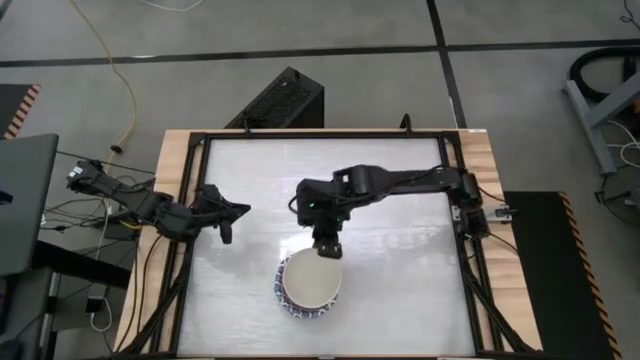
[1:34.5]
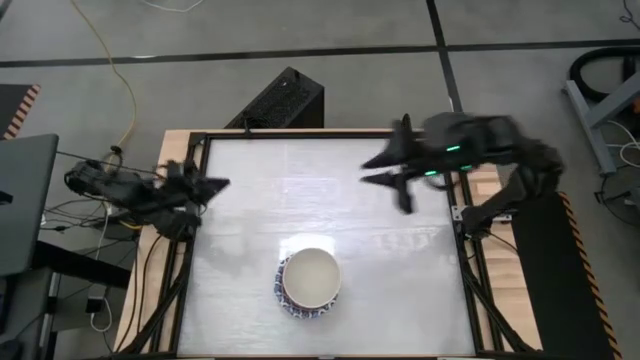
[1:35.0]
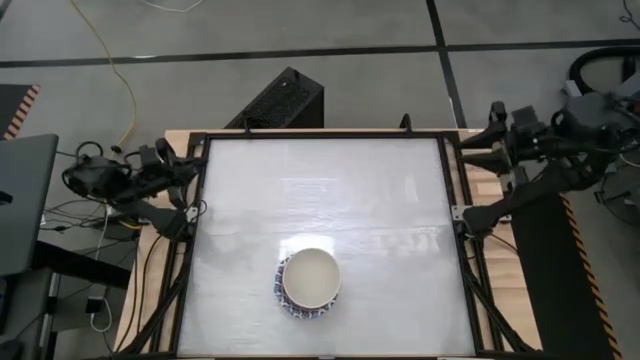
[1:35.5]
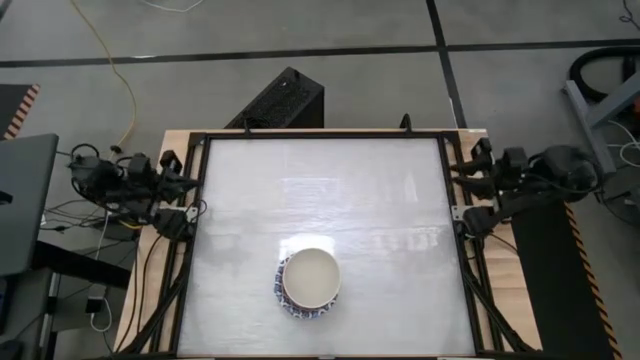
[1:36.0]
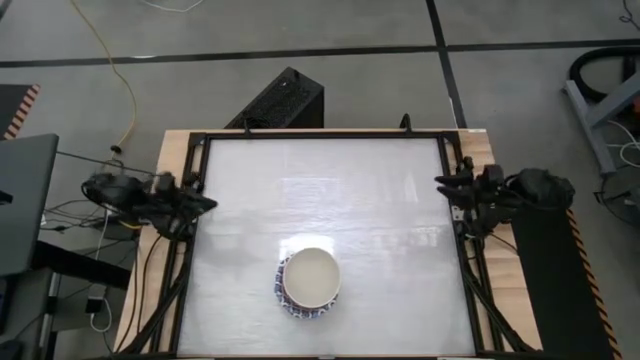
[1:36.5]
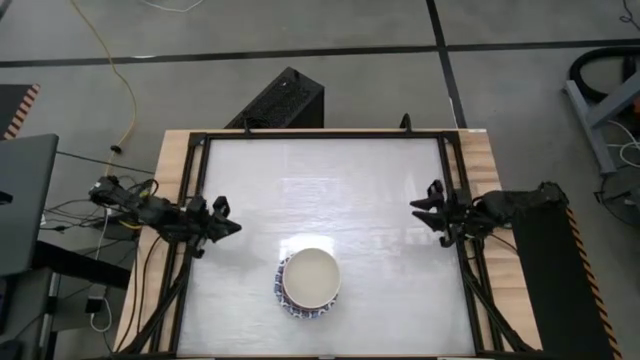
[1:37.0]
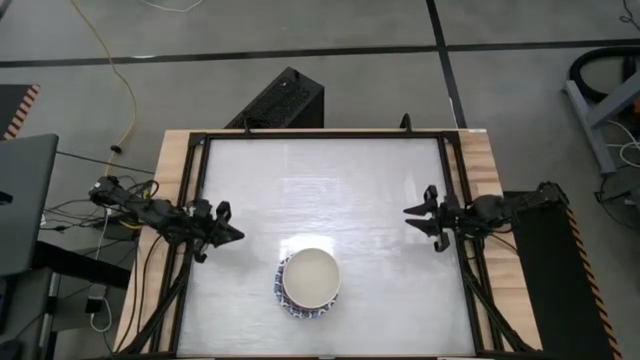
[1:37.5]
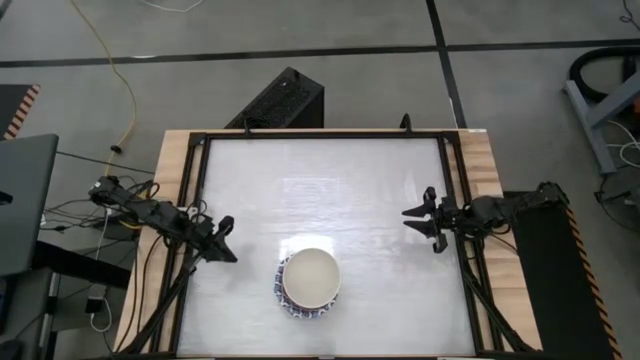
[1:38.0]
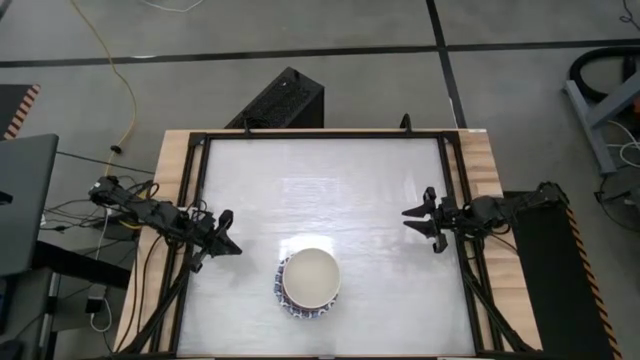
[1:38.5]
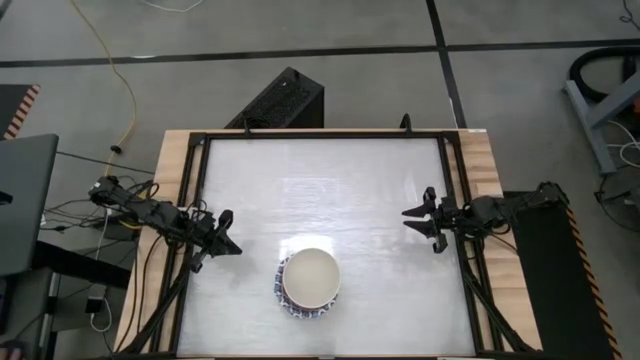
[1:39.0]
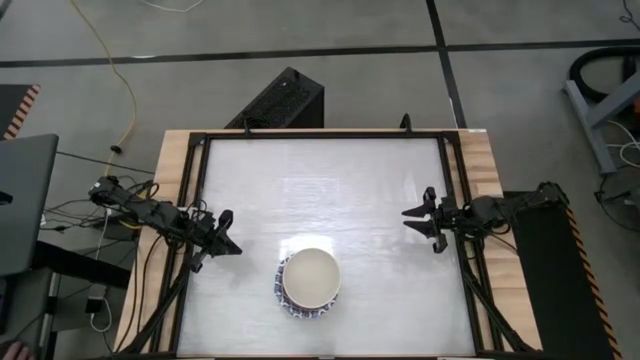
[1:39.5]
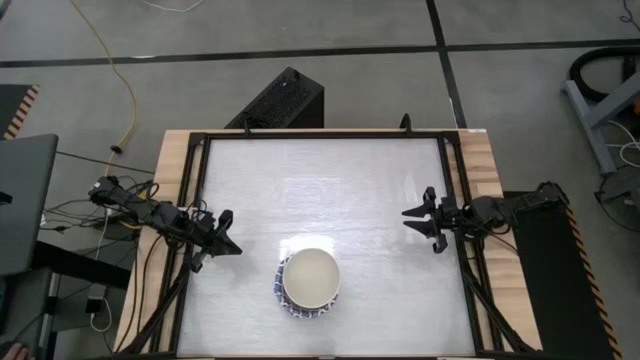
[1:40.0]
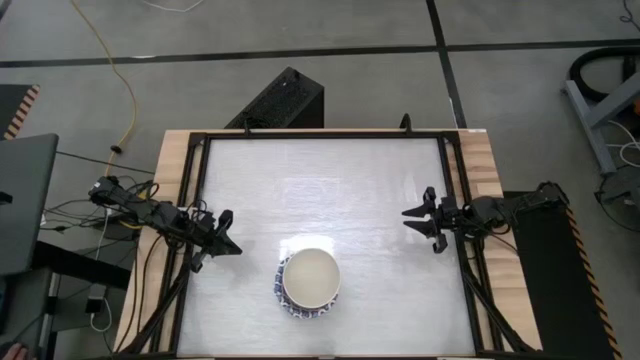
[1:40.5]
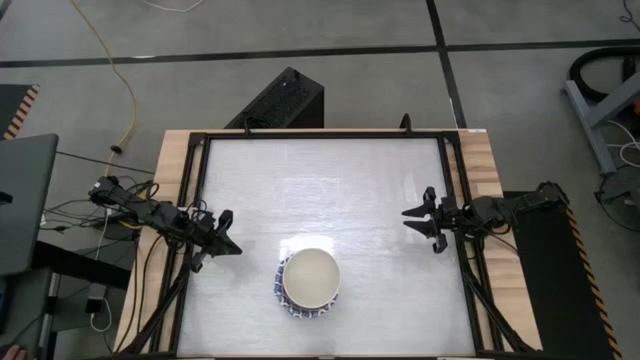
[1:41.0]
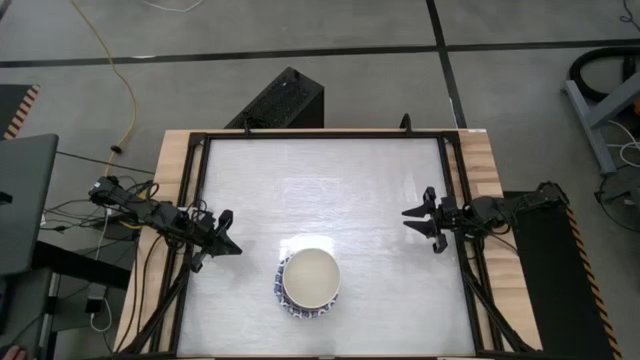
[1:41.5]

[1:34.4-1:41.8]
Return to Home Position
